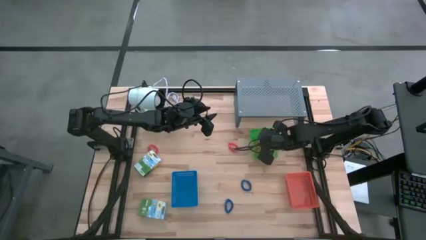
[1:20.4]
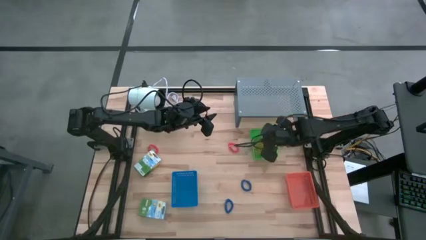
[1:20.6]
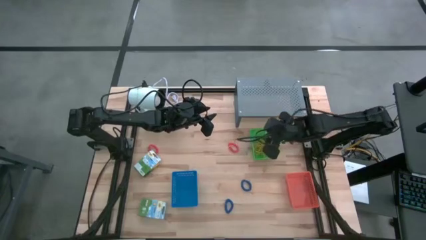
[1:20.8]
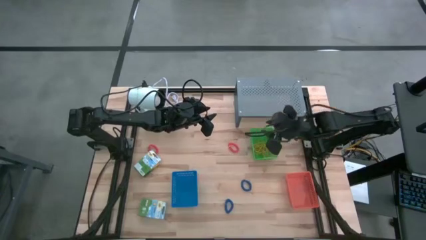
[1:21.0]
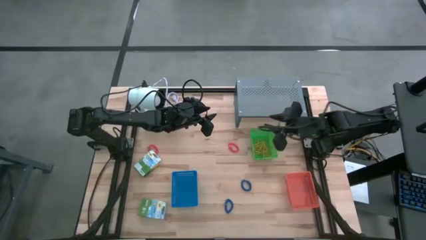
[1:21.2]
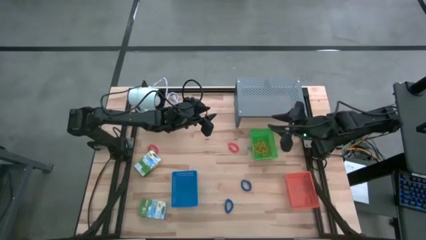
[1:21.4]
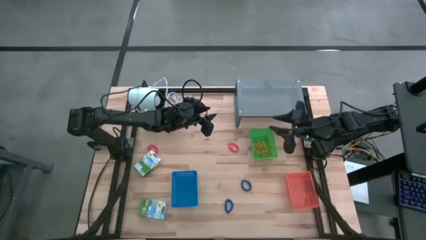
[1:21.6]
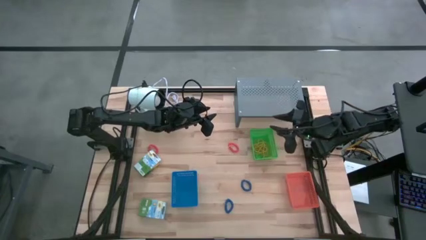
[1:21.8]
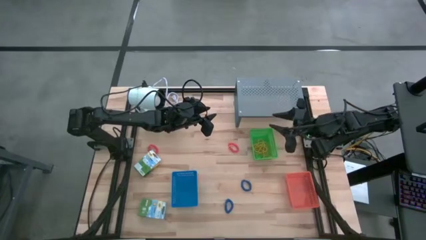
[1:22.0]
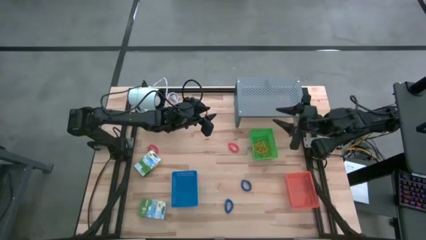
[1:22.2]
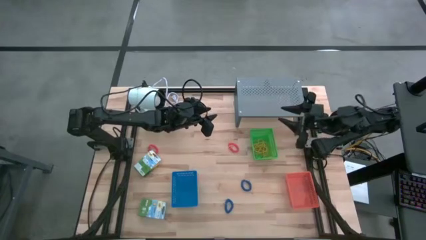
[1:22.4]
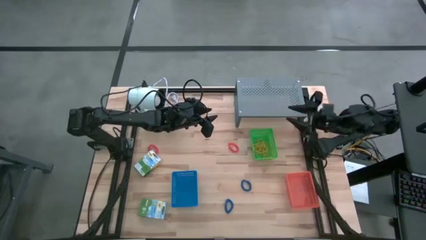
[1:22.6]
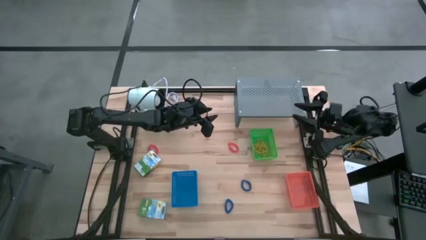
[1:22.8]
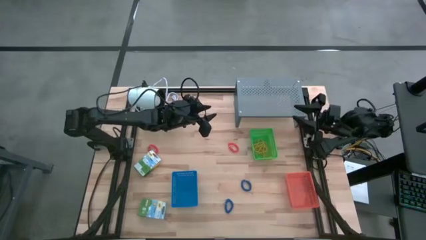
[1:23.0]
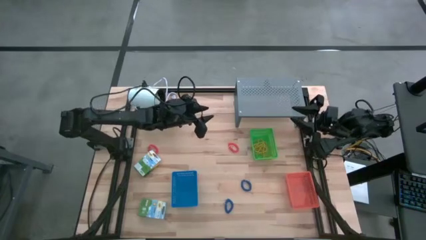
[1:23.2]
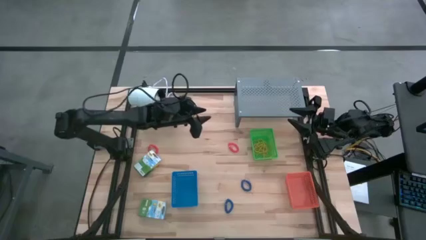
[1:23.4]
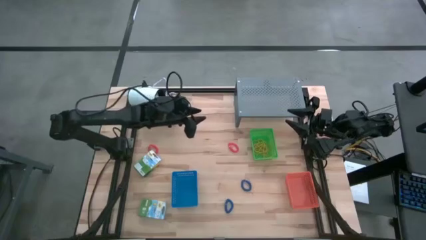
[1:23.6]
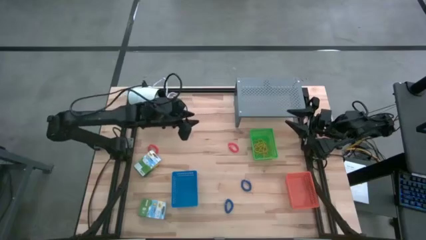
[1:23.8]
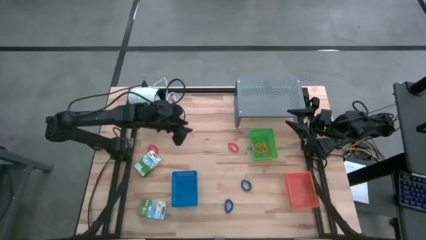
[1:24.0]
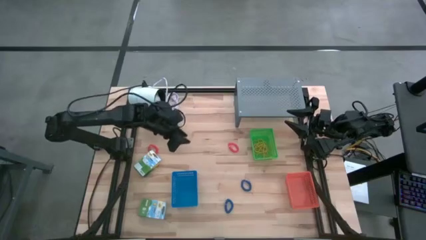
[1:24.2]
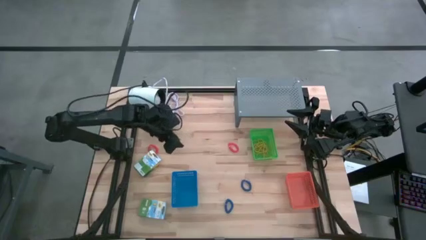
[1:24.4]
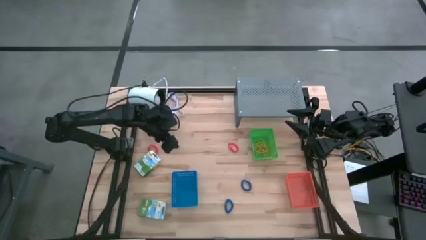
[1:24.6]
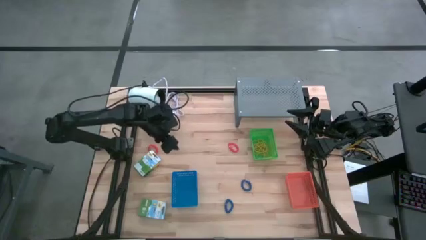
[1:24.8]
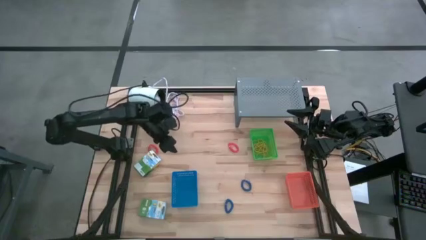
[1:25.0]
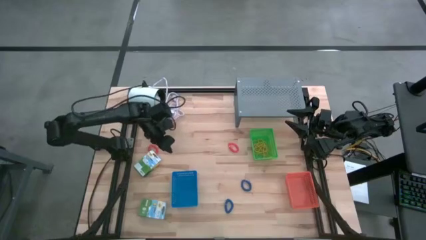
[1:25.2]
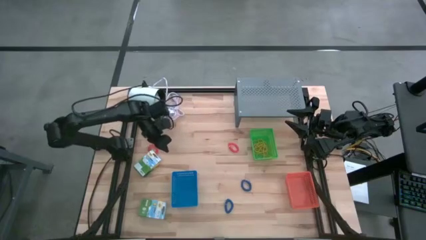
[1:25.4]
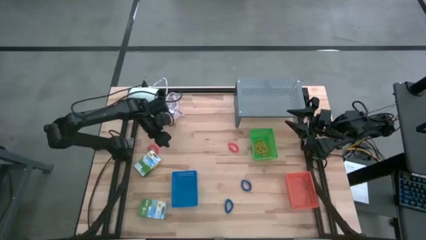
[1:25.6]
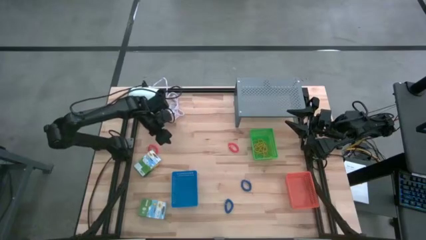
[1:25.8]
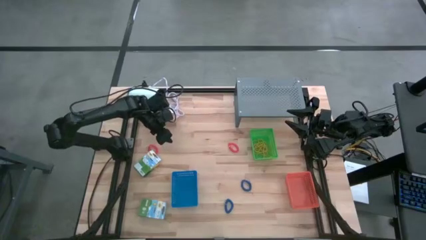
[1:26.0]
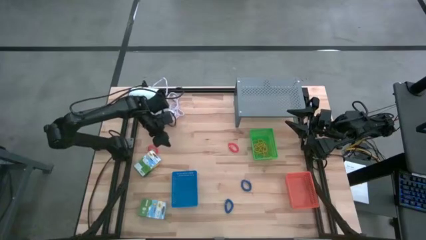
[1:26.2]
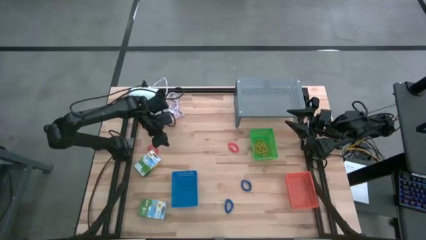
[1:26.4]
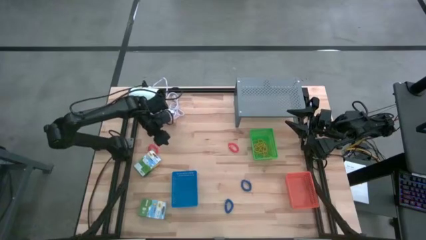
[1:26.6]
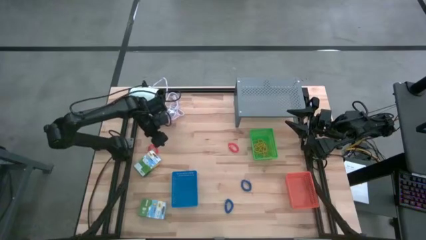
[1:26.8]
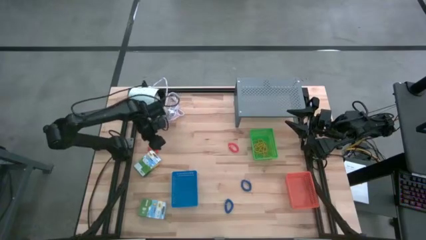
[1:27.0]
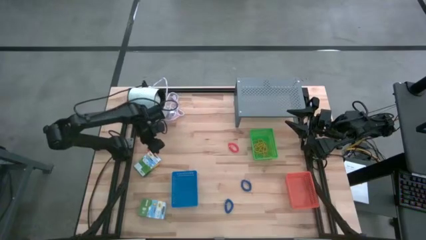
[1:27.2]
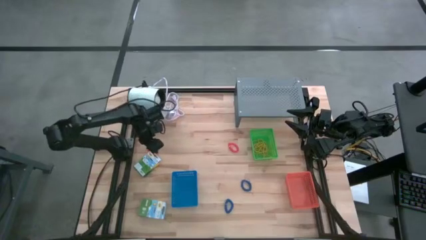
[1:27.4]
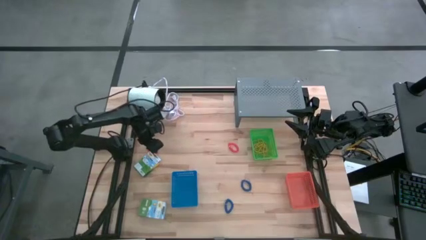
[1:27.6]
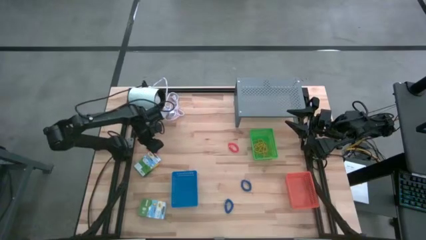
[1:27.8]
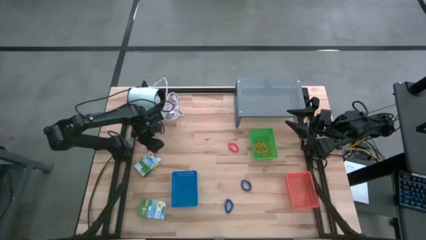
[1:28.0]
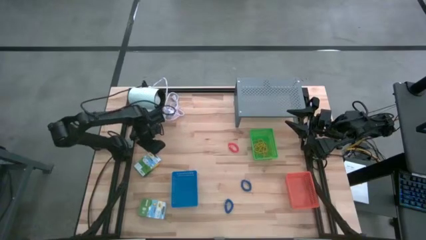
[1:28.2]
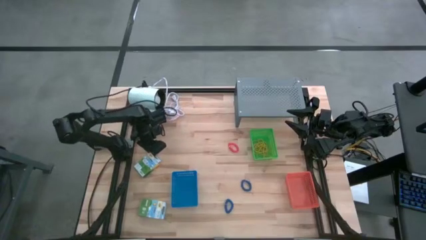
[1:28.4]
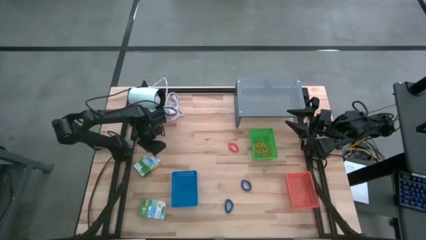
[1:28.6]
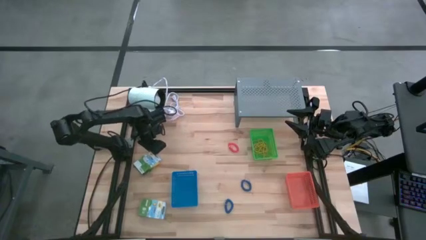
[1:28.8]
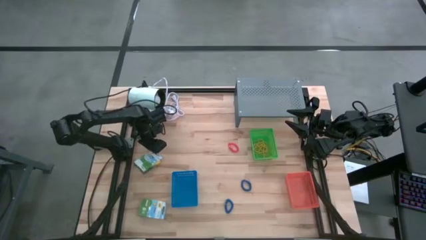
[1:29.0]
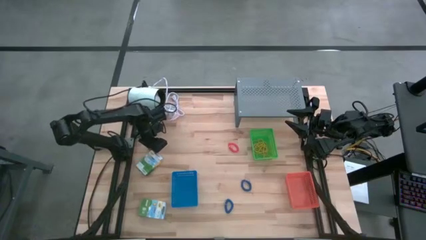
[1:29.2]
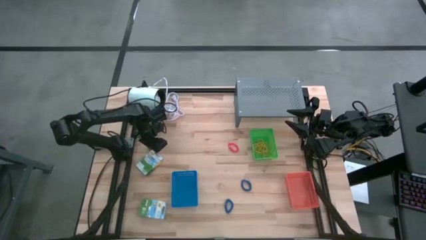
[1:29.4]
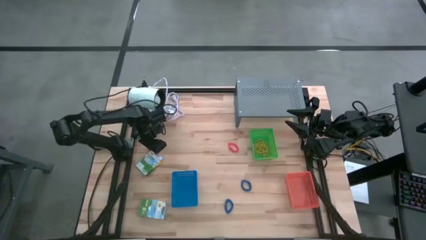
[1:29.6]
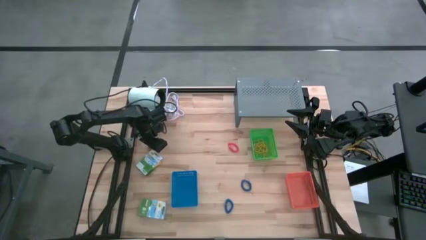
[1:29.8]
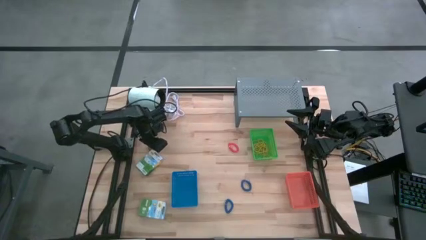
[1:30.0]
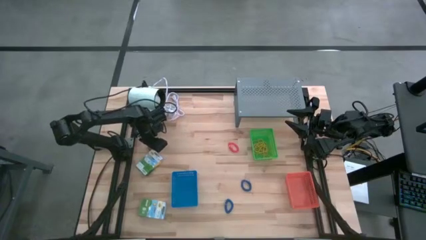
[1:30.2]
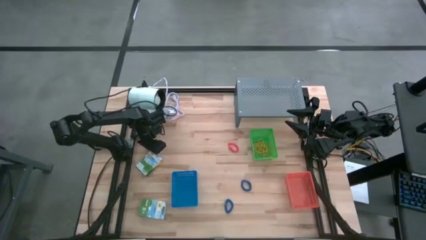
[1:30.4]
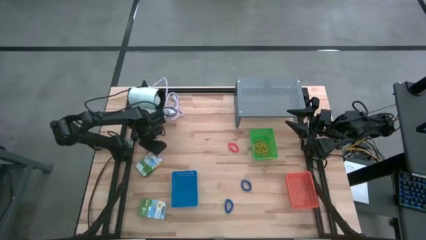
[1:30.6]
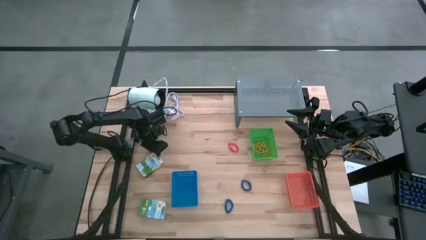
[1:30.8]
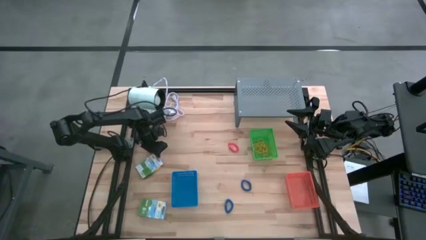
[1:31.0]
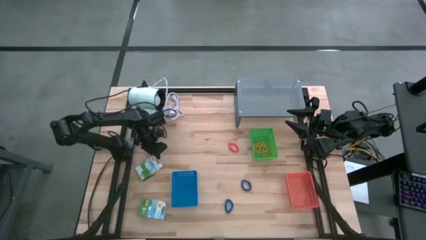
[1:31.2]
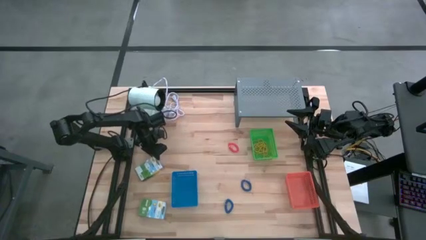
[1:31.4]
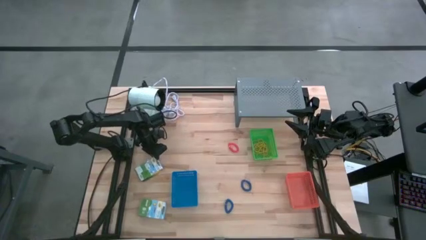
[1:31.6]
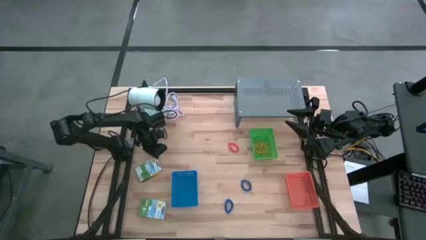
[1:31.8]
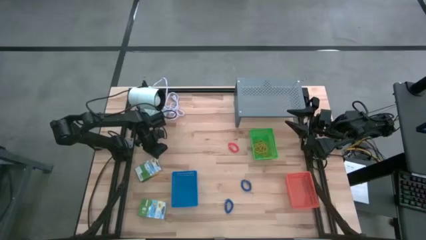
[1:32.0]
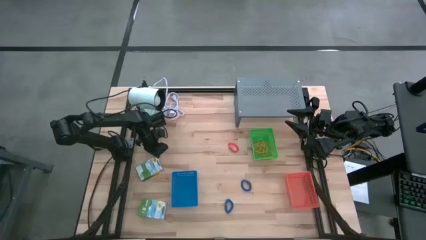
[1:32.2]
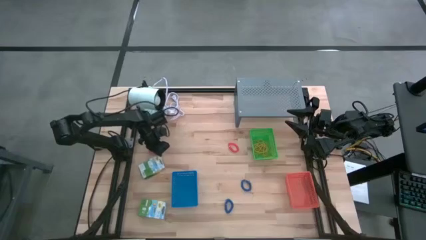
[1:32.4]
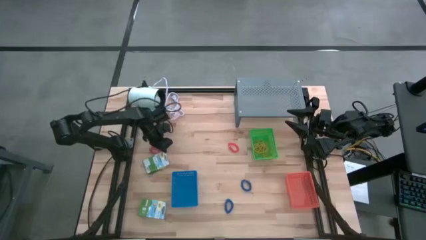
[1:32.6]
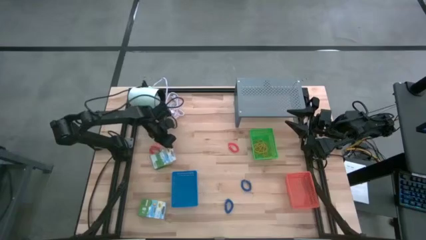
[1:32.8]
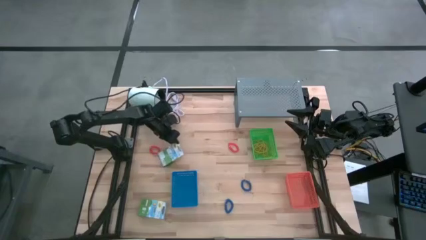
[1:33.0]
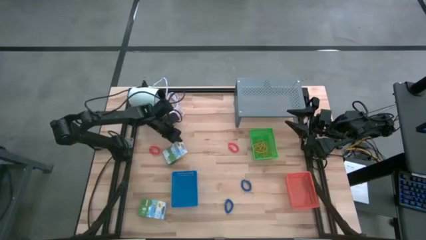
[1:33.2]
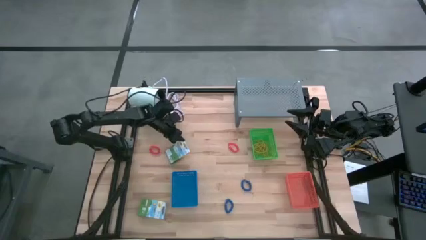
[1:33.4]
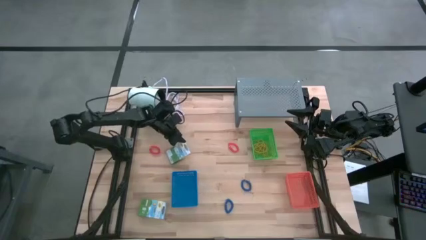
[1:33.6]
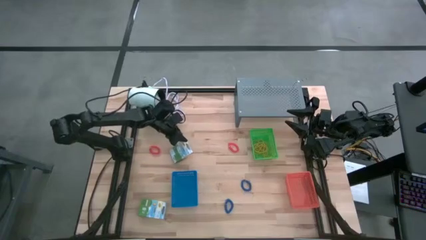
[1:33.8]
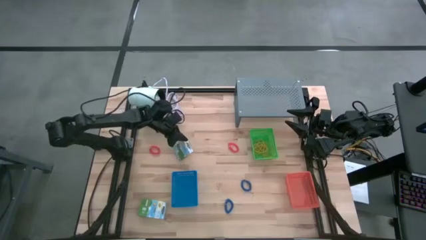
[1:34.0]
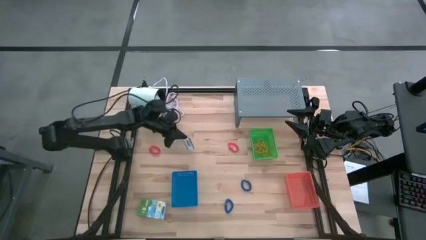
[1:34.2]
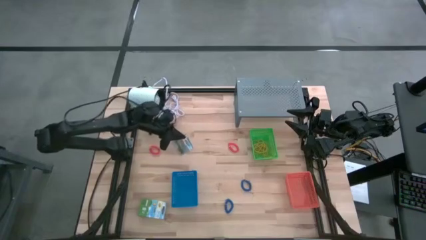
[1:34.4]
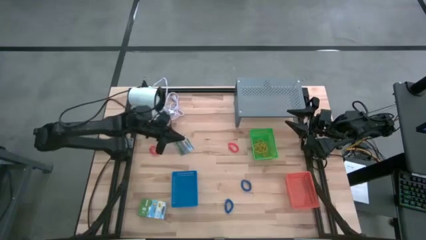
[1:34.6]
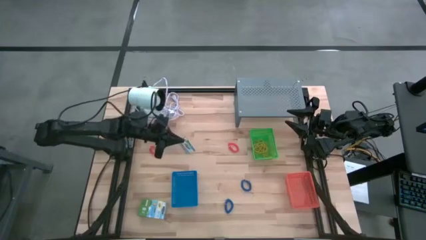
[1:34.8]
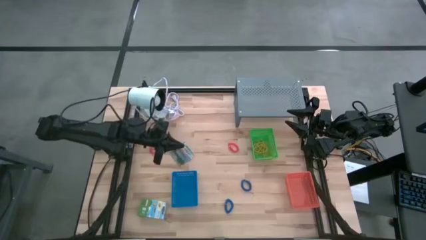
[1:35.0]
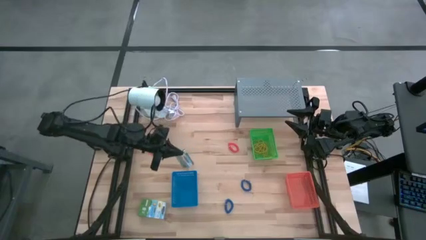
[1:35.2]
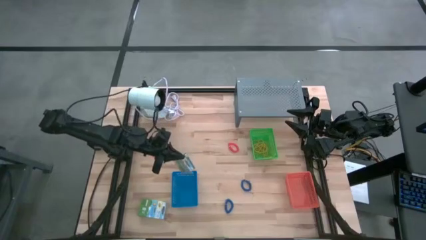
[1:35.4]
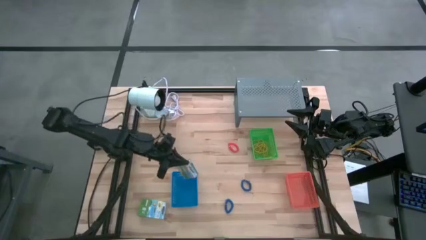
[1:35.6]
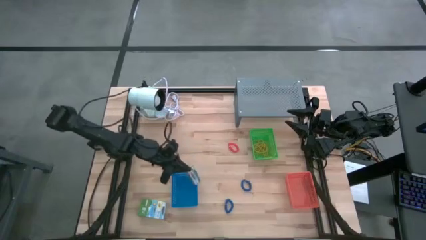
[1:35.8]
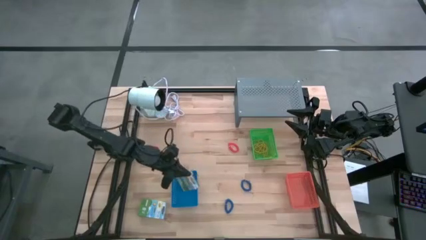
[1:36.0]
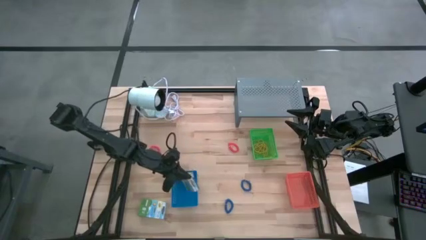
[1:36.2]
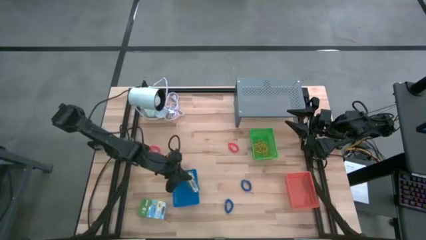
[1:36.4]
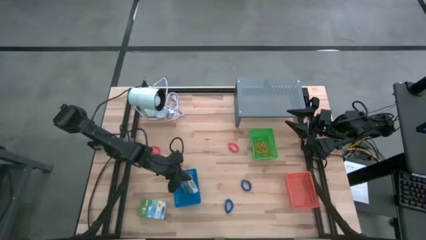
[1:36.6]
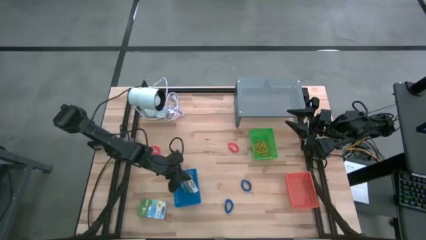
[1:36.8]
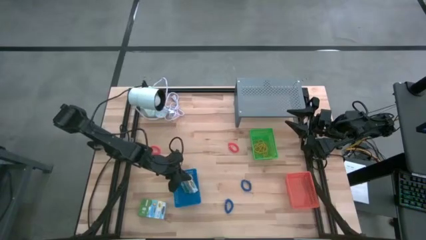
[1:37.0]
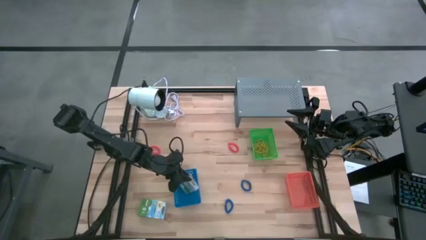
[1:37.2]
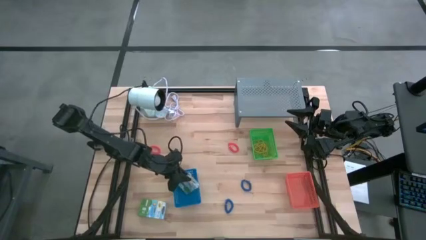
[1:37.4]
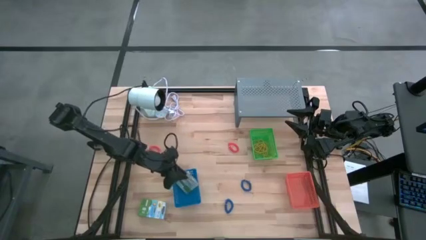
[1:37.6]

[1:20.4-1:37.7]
Task: Pick & Place Office Desk Supplies
Put the crayon box into the blue bin
